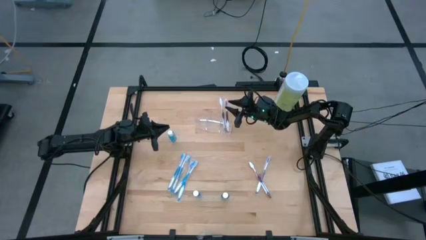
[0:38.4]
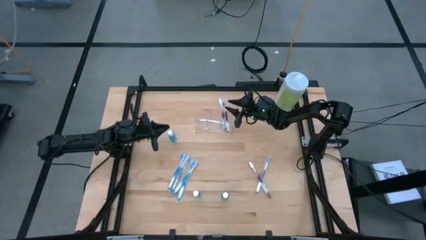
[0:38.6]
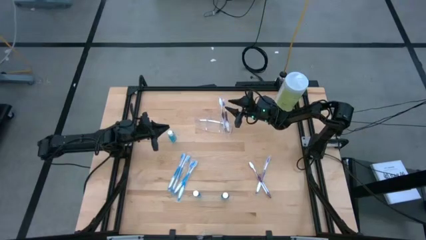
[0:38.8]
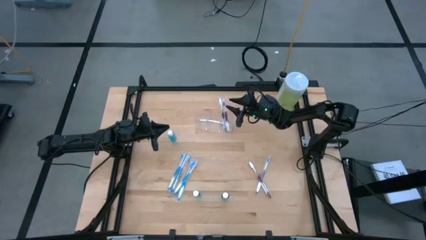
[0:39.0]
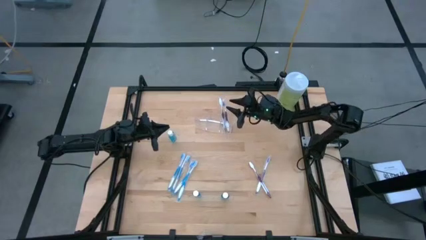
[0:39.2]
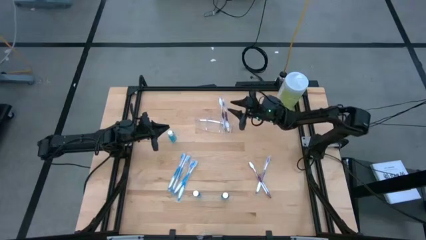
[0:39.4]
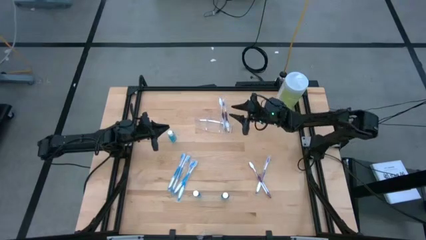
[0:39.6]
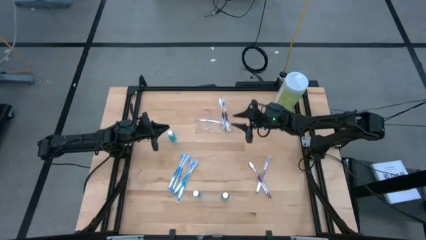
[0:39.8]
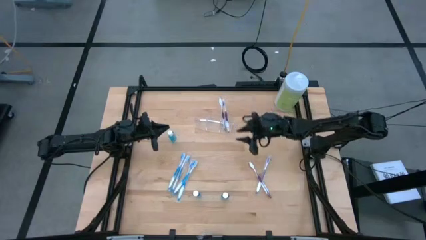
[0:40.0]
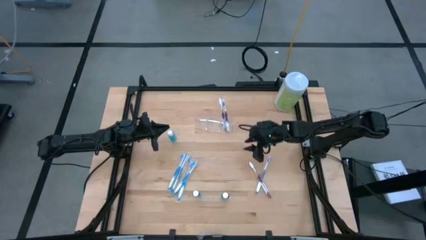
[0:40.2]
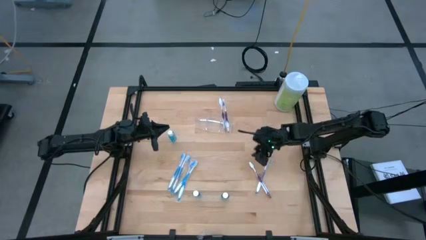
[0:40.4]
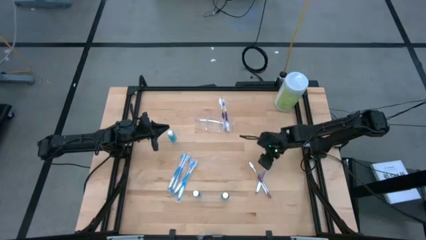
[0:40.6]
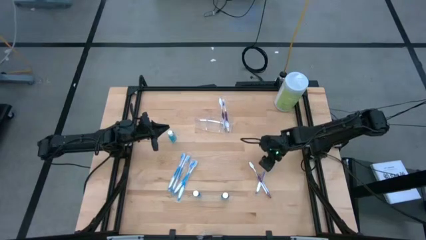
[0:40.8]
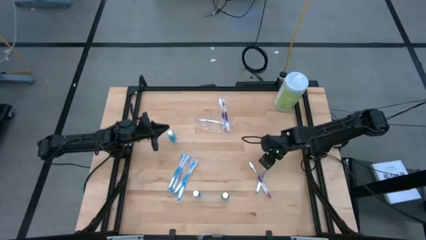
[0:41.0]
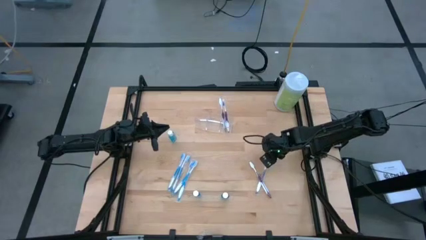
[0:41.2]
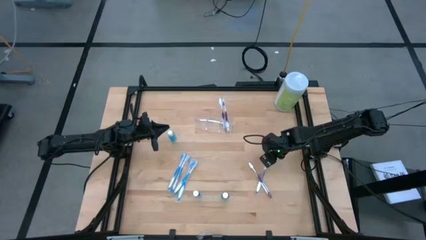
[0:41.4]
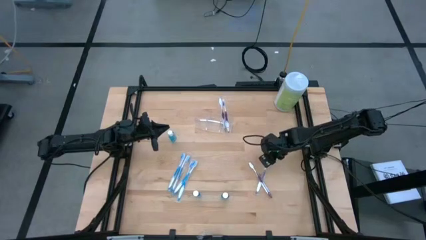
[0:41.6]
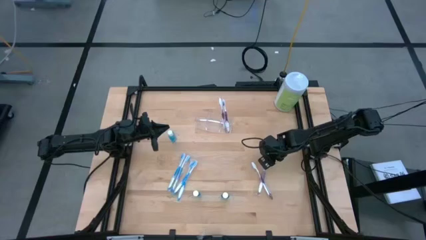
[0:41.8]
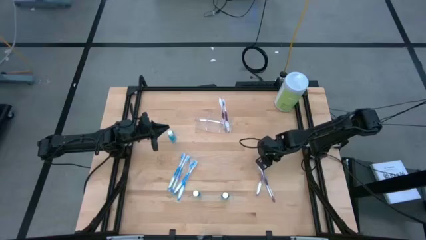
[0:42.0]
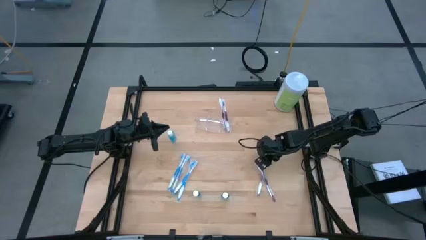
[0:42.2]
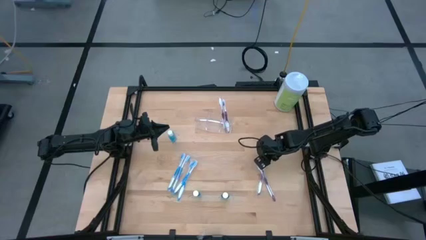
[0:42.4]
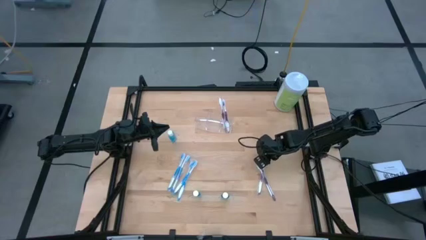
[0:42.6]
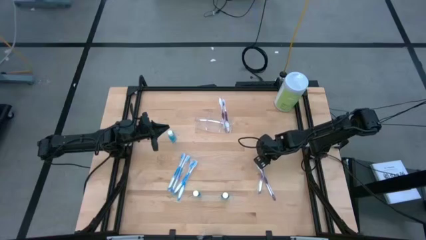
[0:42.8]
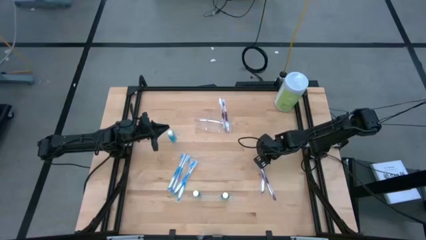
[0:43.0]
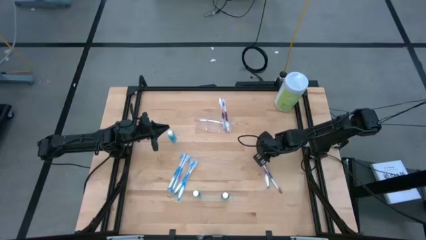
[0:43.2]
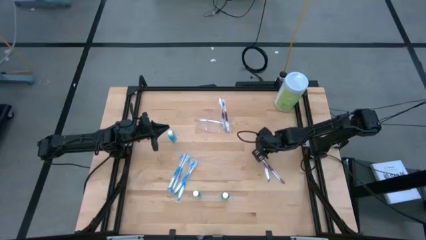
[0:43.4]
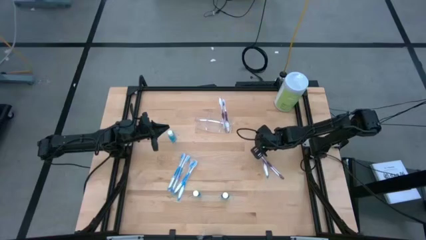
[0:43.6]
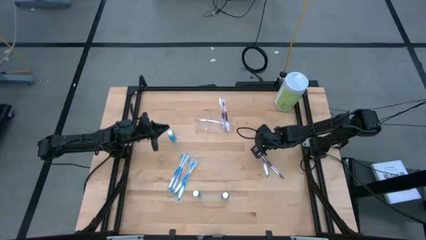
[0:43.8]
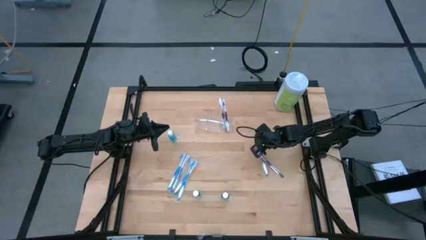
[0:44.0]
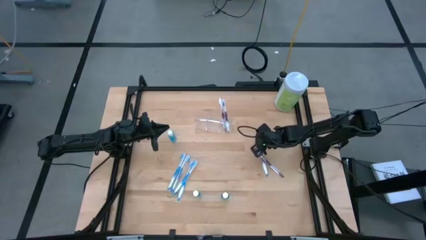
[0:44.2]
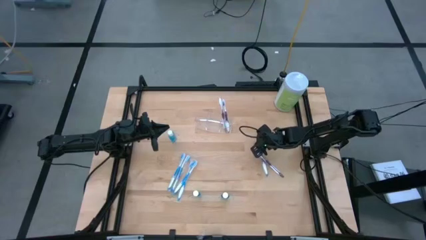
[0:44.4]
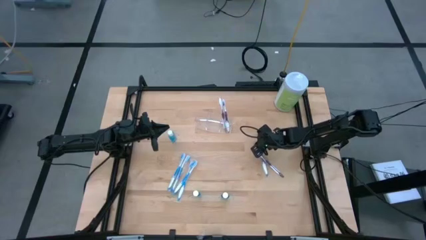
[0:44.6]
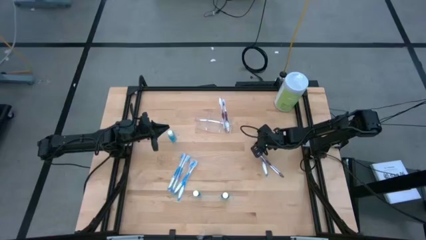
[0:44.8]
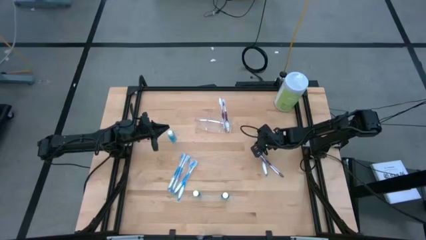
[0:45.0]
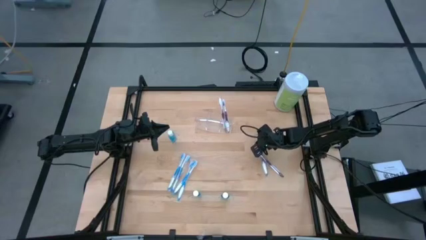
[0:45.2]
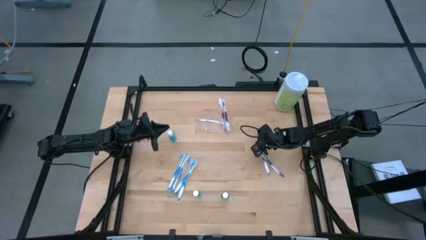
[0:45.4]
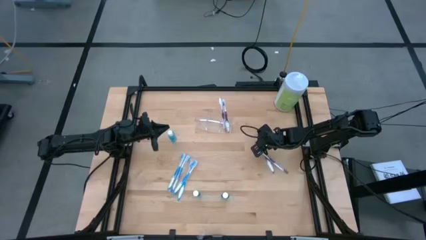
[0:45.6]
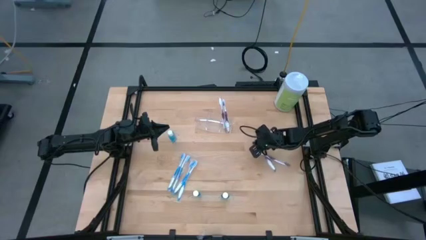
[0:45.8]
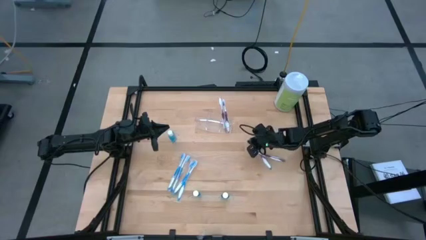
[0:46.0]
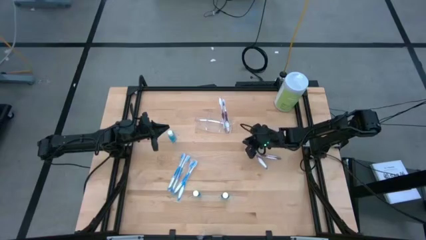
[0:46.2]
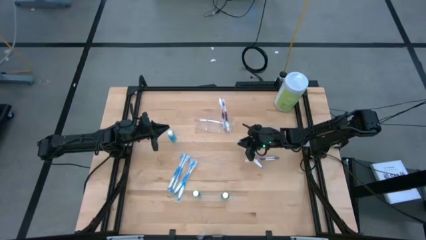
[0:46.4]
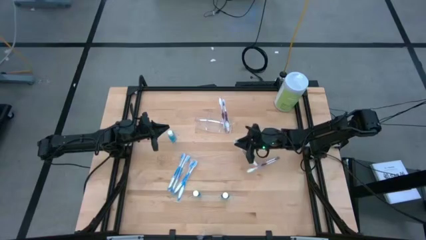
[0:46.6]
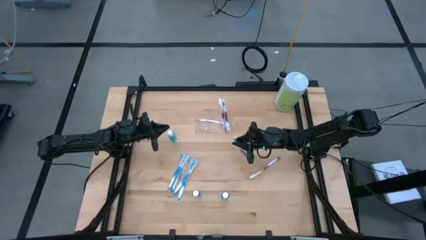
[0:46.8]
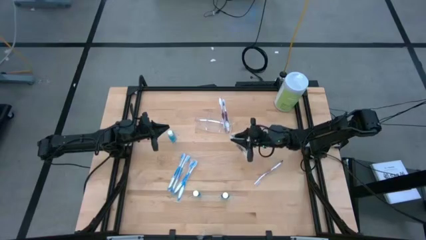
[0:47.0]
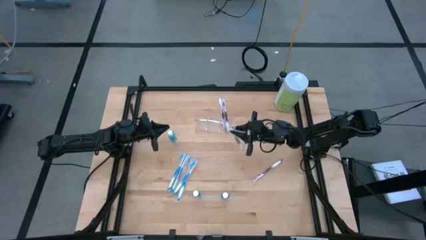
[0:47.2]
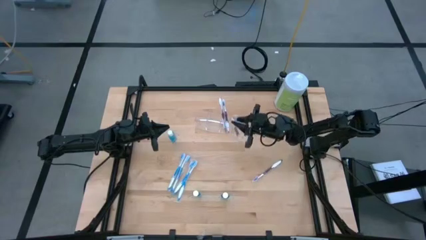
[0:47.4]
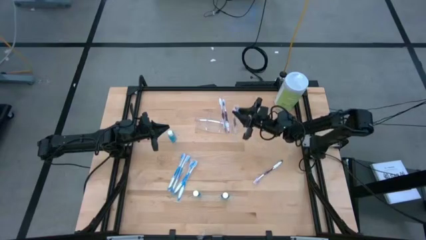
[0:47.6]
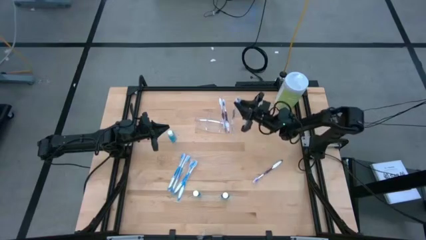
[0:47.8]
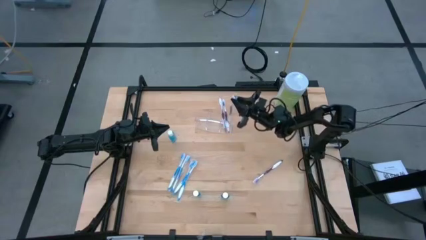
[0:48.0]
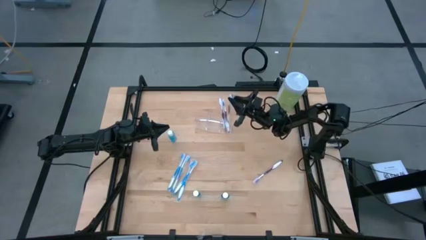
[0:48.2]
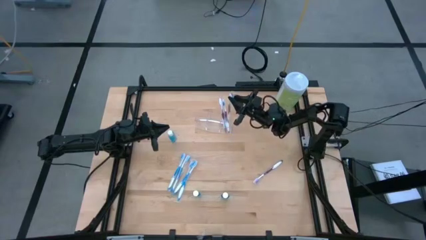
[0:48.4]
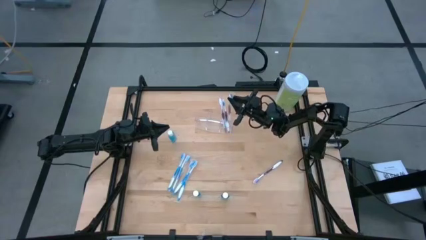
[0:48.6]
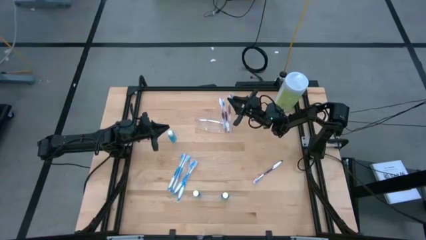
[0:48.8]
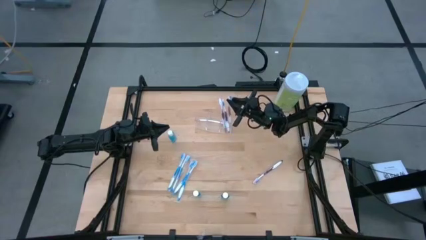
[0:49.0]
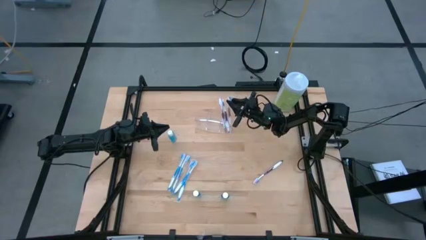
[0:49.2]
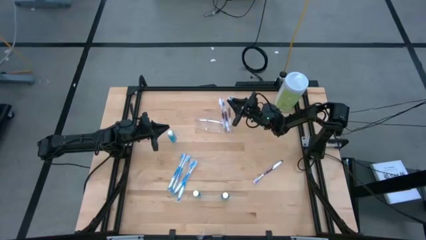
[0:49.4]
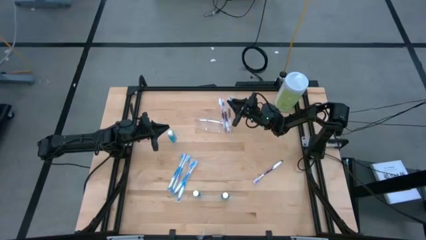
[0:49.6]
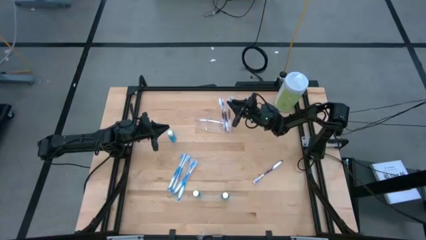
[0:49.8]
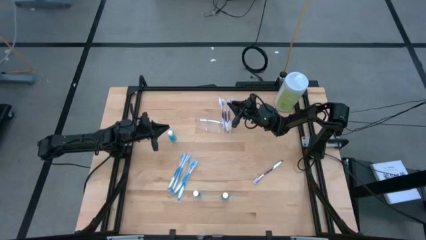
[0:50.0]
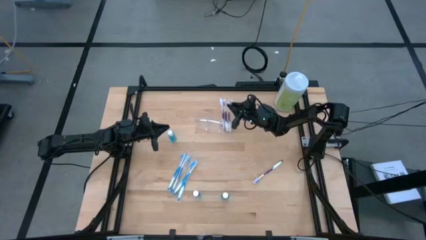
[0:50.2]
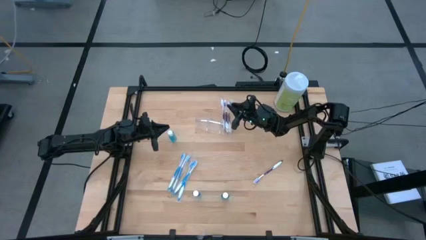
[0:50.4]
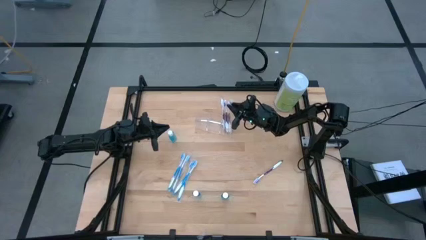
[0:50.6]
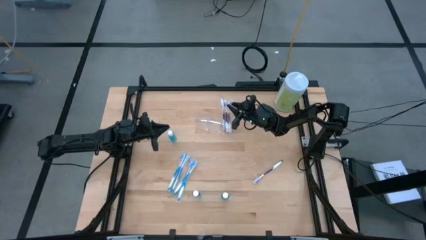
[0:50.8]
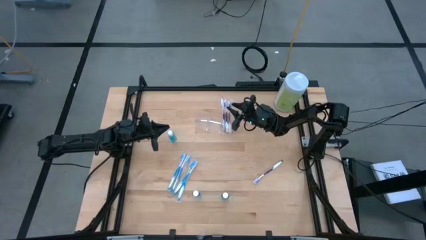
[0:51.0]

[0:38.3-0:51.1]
Task: Pick & Place toothbrushing station
Put the violet toothbrush into the transparent organizer
